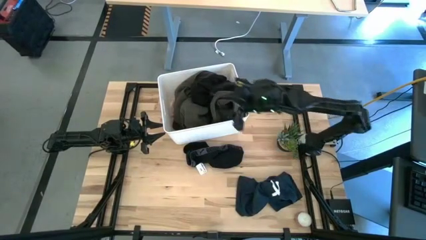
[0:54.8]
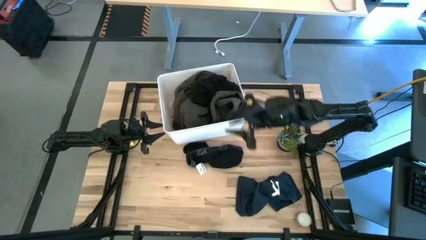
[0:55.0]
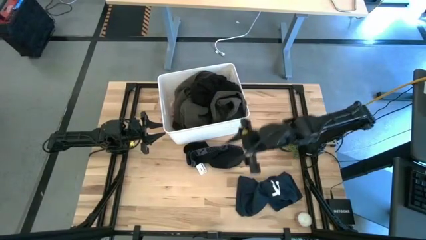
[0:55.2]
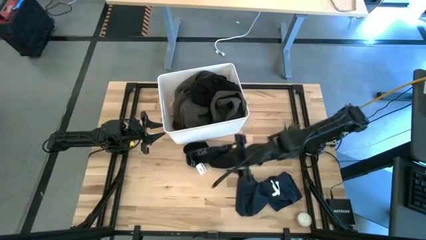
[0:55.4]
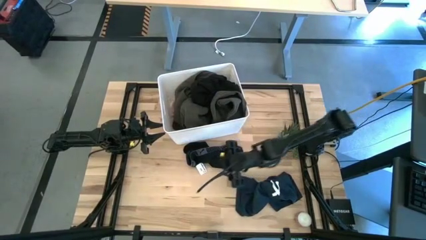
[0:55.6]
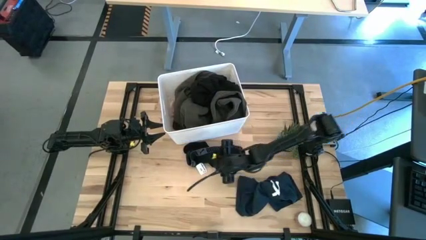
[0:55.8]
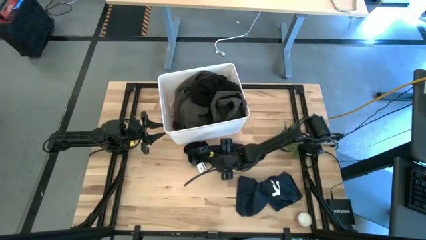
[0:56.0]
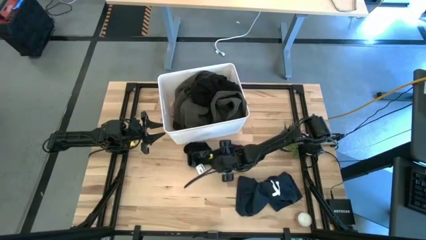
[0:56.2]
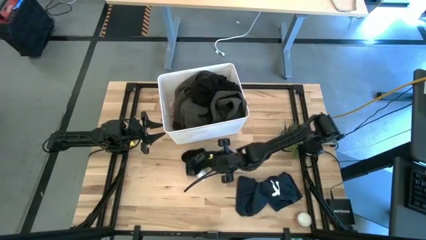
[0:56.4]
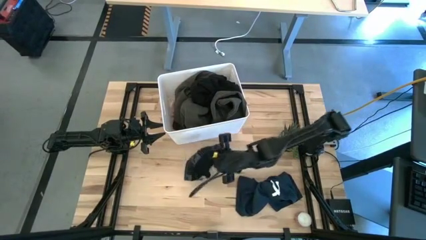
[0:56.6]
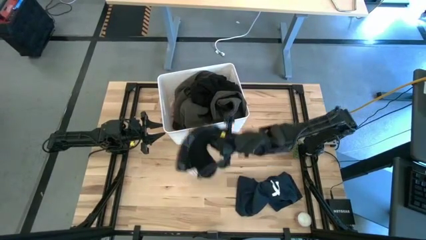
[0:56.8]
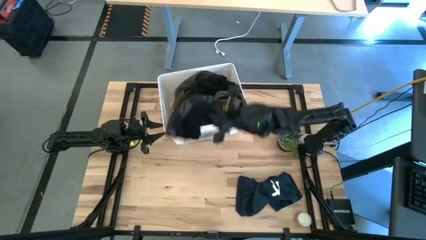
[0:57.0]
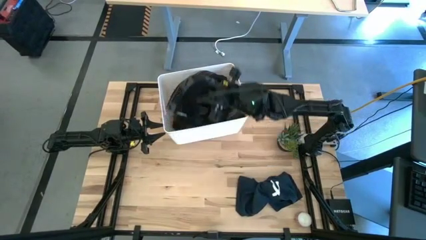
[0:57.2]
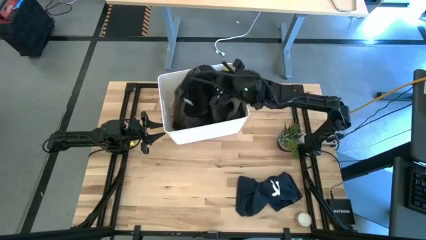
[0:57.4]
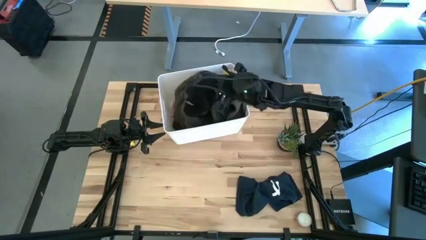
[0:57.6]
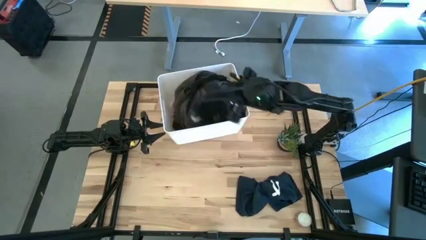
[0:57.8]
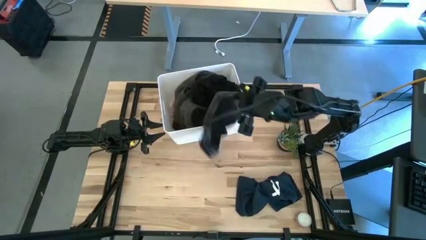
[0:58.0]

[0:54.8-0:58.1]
Task: Sort clothes
Put the black boxer into the white laundry bin

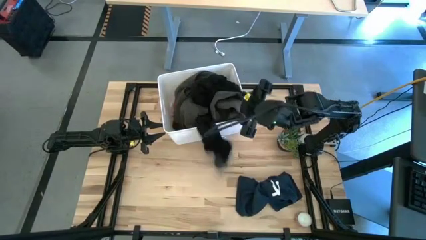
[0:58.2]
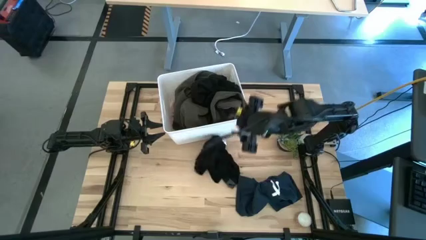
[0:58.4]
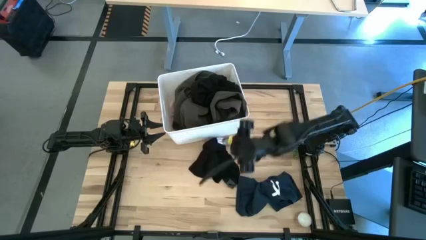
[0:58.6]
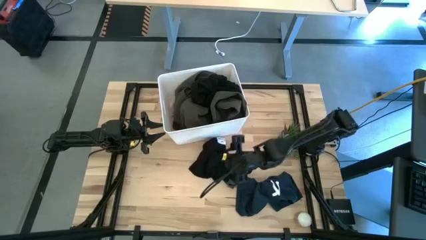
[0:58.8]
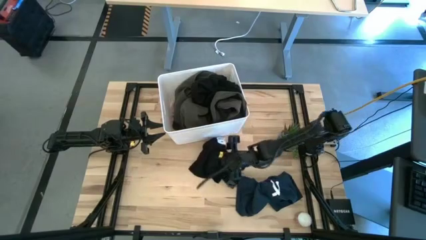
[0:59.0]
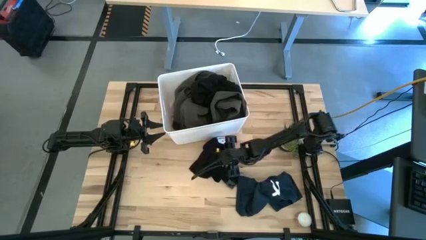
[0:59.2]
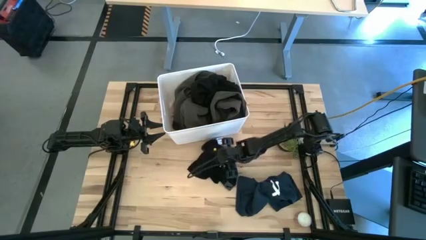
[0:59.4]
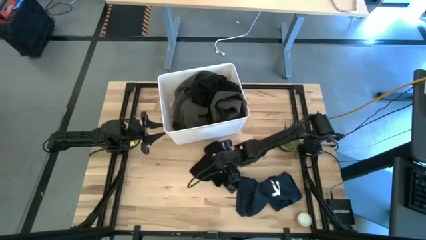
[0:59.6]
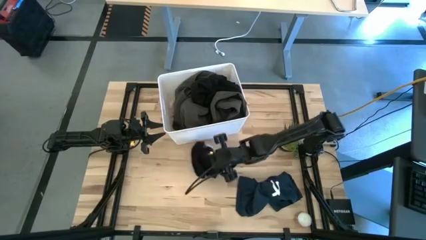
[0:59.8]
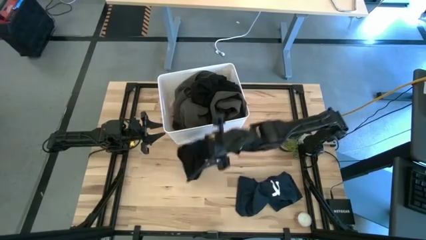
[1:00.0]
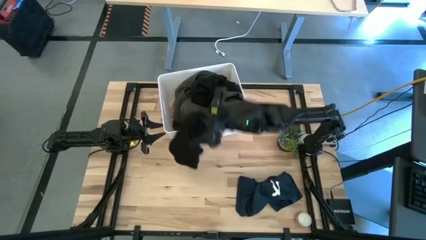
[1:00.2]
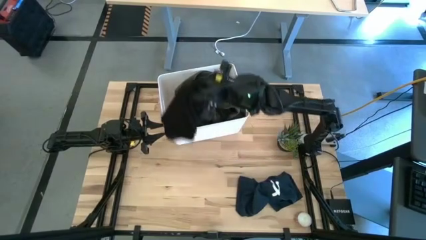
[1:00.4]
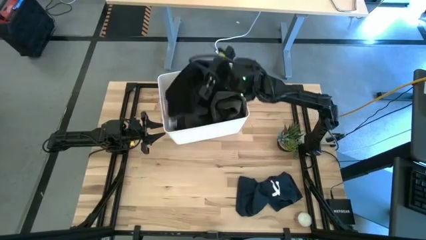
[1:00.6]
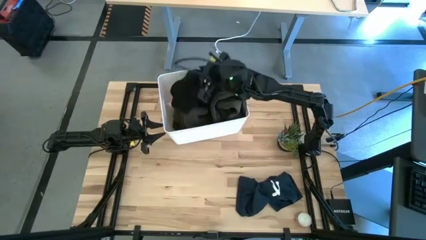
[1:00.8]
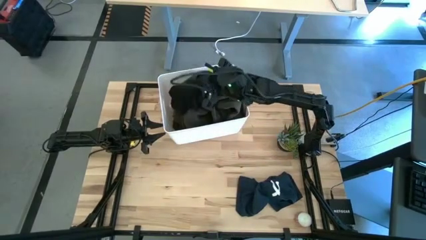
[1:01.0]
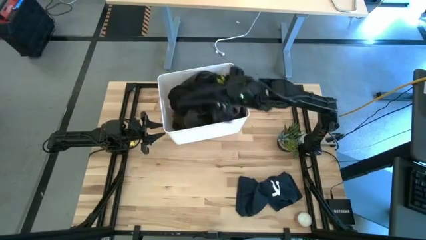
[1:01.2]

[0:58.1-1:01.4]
Put the black boxer into the white laundry bin

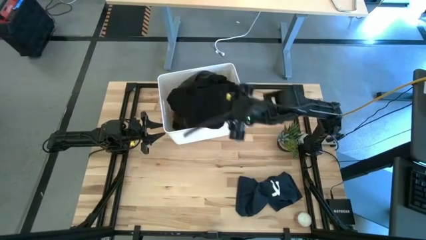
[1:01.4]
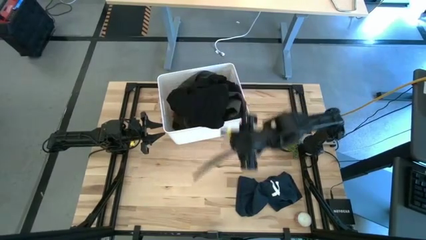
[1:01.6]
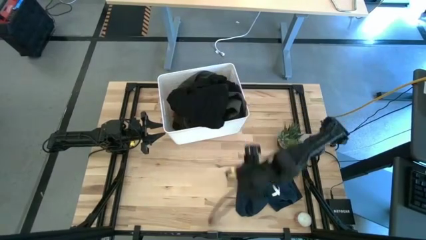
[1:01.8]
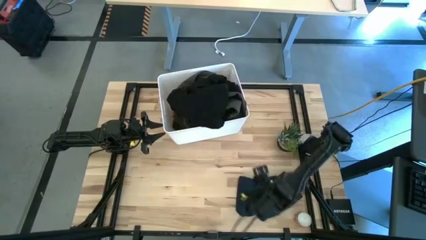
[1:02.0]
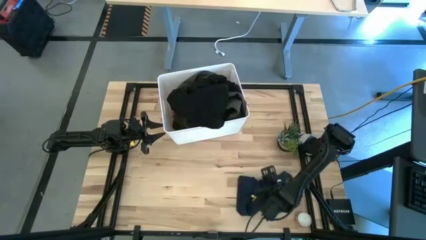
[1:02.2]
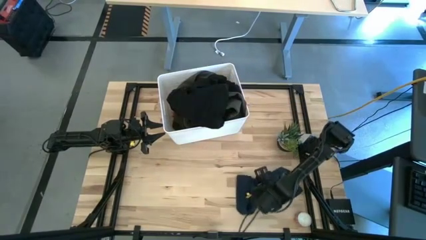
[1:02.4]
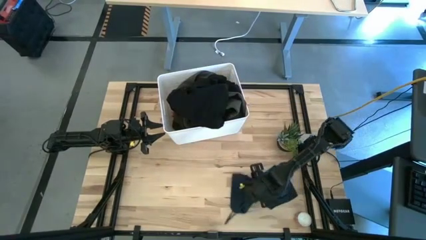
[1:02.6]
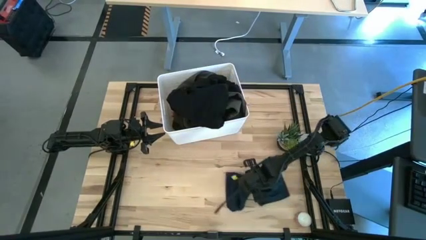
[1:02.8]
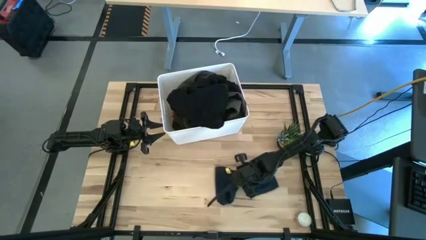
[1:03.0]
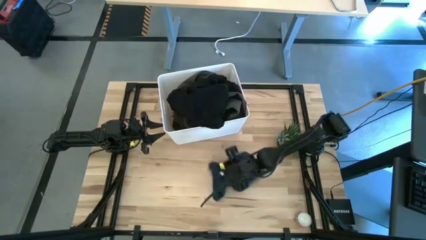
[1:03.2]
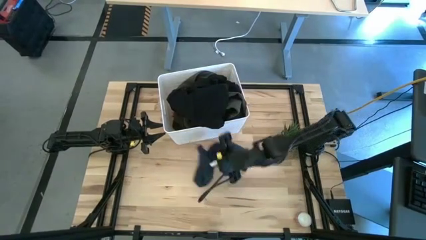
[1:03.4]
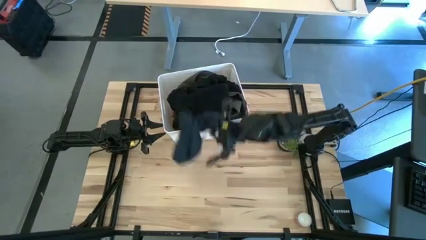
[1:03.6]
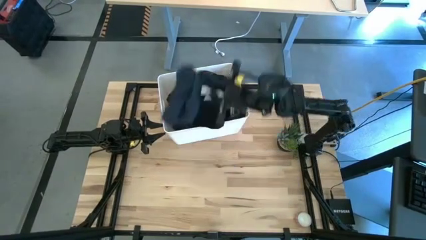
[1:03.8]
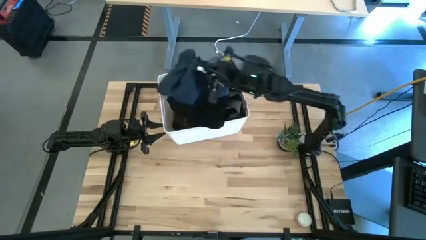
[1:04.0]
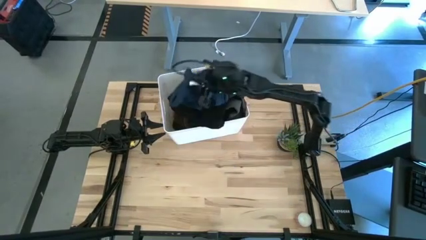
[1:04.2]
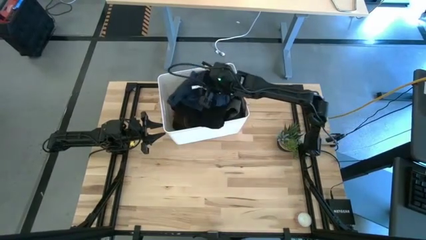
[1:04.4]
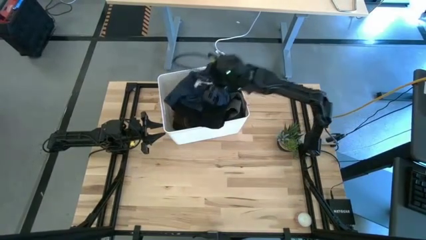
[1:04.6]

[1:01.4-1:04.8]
Put the dark blue shorts into the white laundry bin
